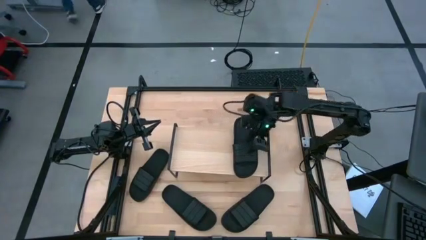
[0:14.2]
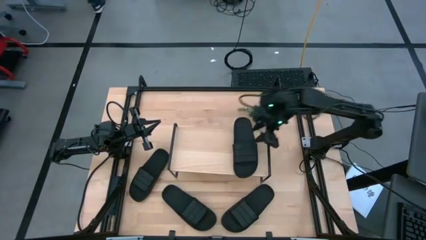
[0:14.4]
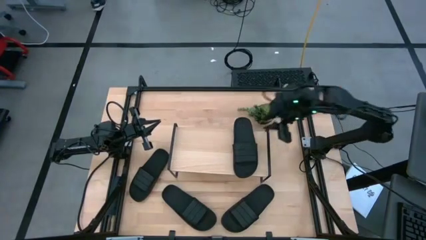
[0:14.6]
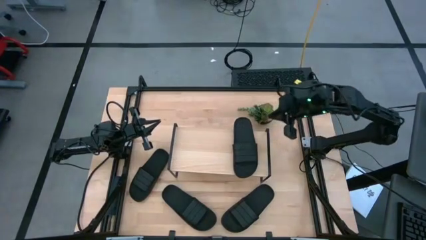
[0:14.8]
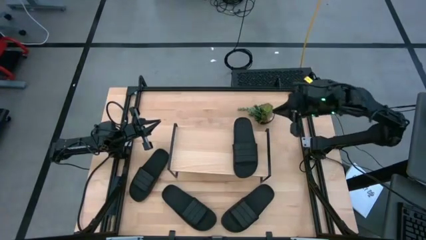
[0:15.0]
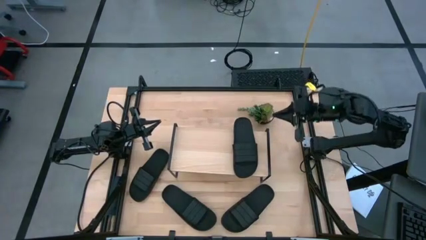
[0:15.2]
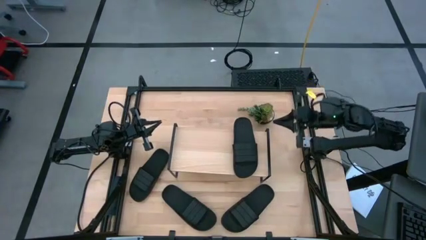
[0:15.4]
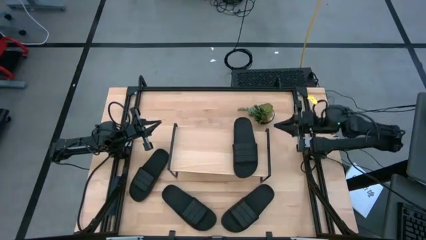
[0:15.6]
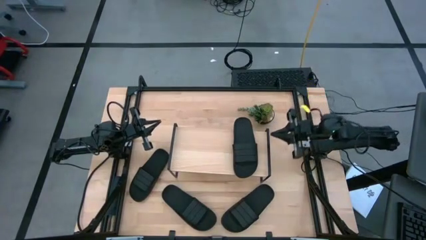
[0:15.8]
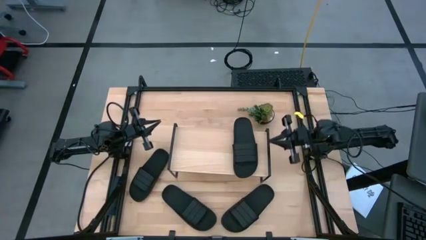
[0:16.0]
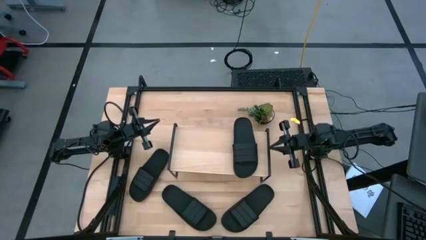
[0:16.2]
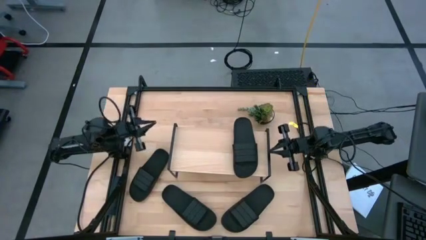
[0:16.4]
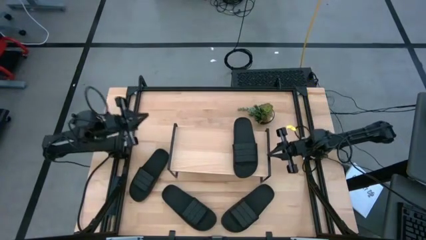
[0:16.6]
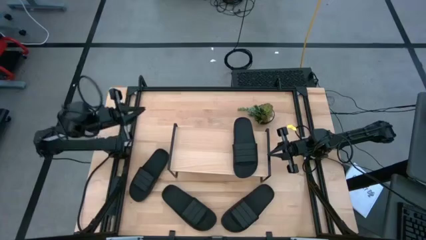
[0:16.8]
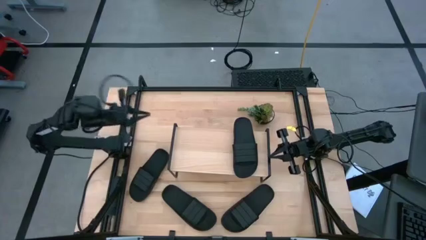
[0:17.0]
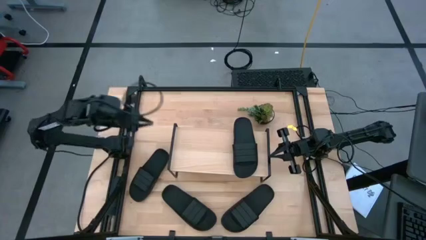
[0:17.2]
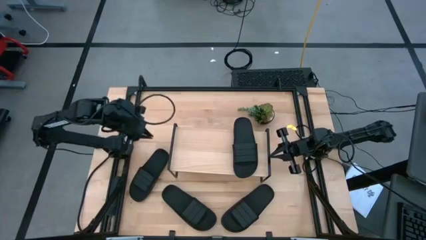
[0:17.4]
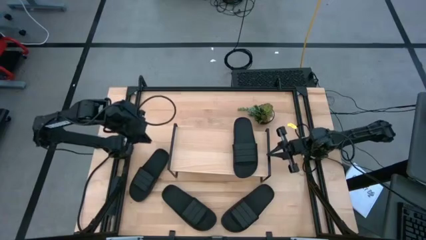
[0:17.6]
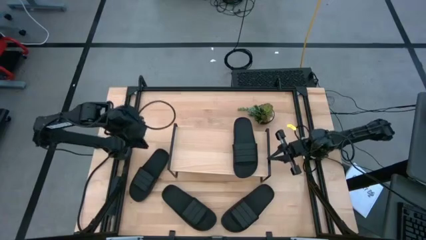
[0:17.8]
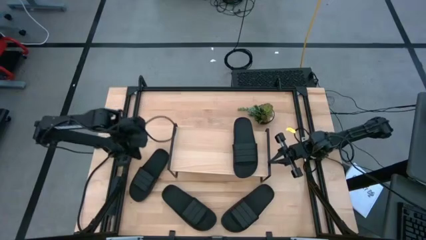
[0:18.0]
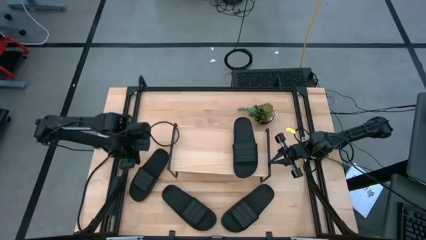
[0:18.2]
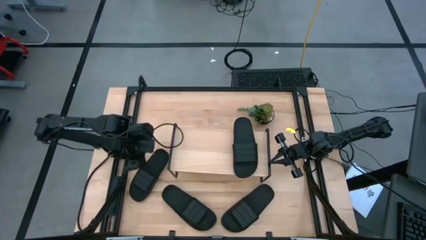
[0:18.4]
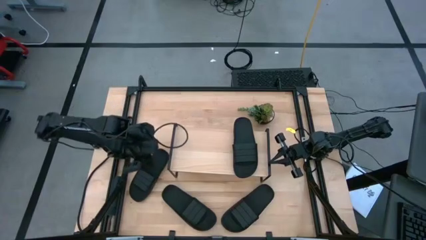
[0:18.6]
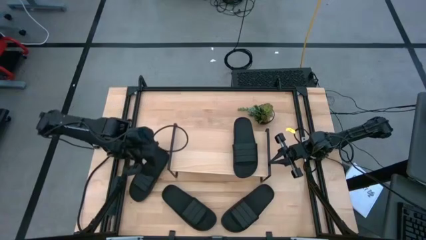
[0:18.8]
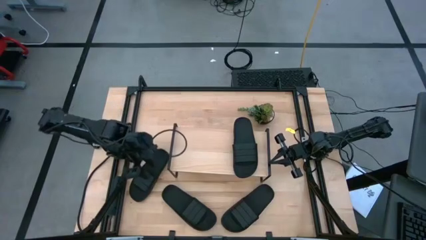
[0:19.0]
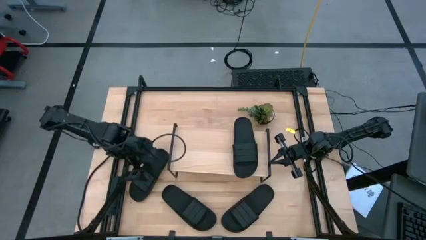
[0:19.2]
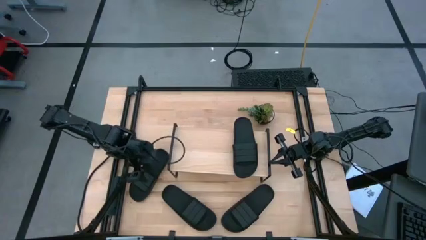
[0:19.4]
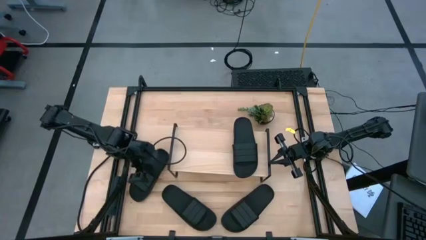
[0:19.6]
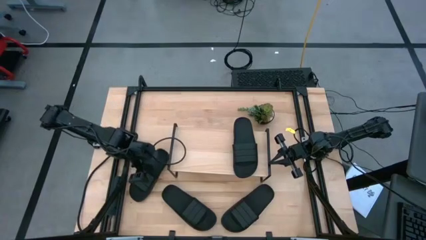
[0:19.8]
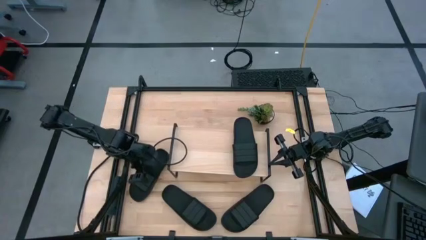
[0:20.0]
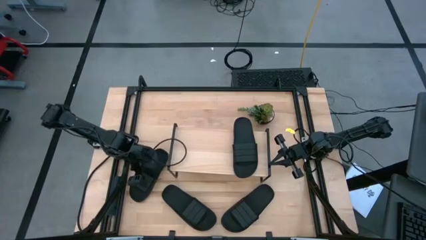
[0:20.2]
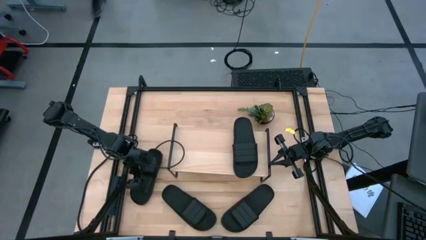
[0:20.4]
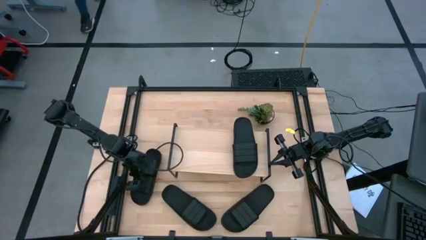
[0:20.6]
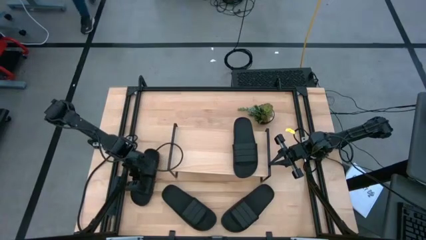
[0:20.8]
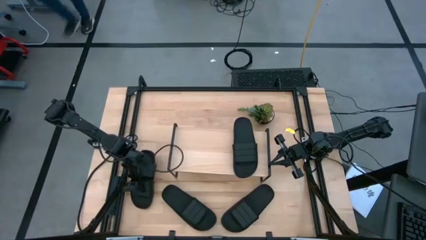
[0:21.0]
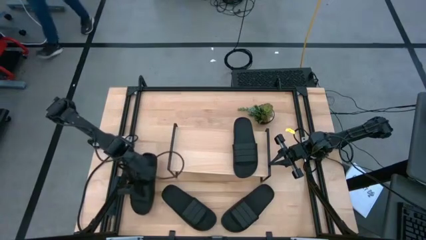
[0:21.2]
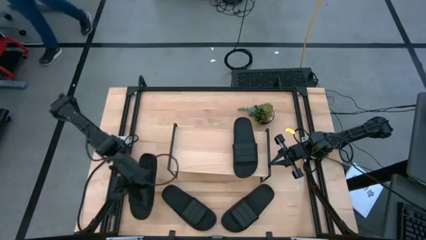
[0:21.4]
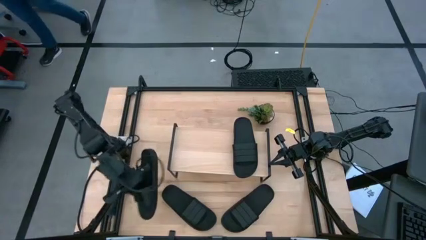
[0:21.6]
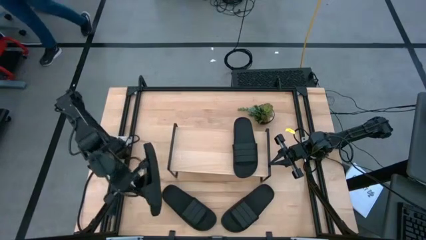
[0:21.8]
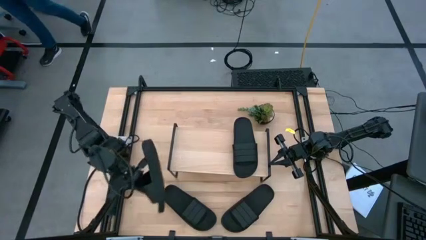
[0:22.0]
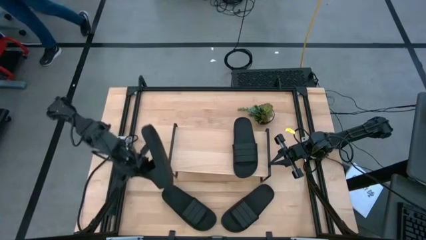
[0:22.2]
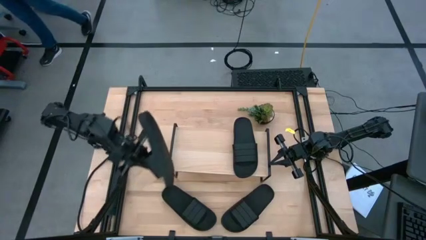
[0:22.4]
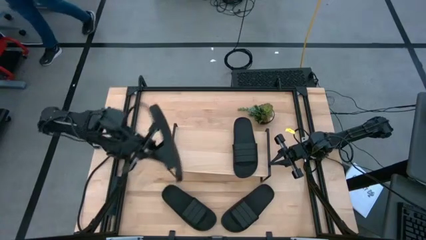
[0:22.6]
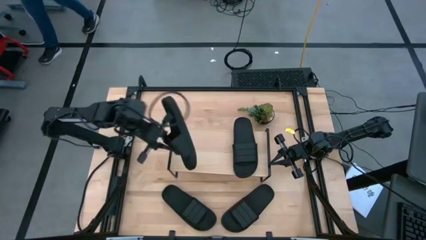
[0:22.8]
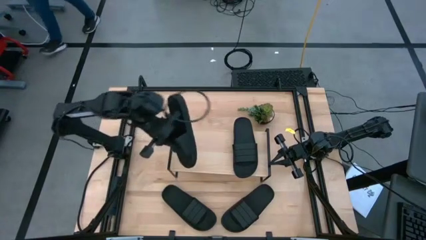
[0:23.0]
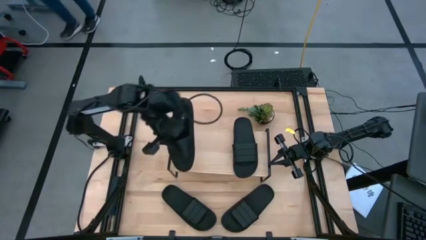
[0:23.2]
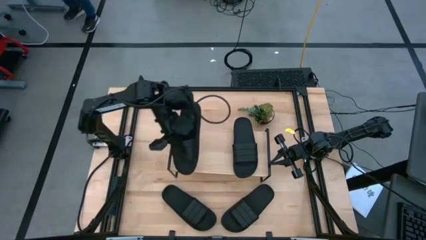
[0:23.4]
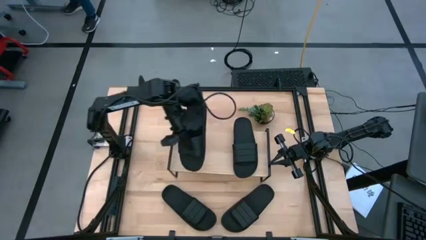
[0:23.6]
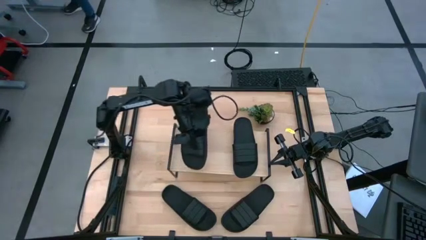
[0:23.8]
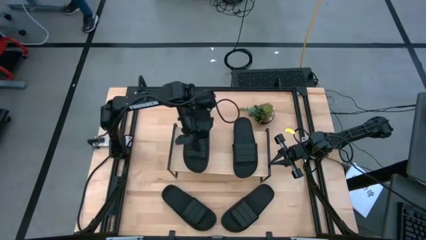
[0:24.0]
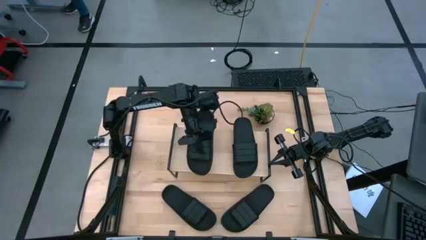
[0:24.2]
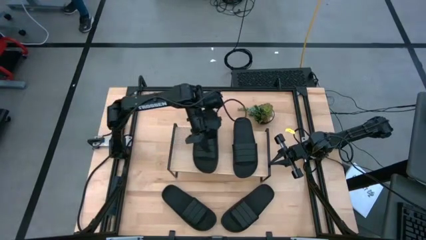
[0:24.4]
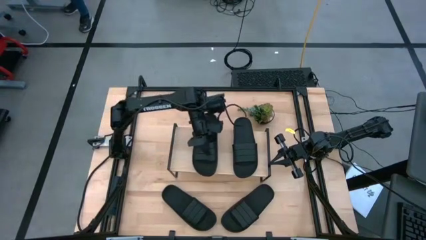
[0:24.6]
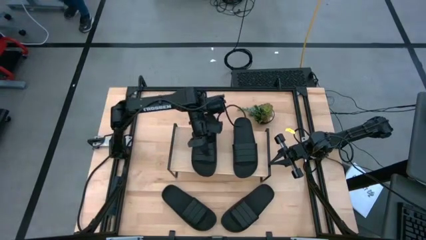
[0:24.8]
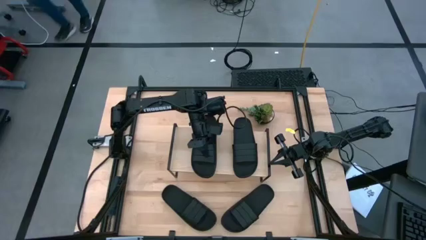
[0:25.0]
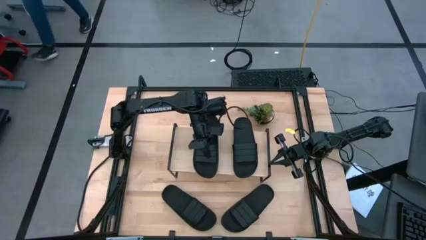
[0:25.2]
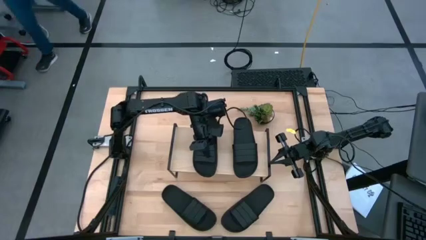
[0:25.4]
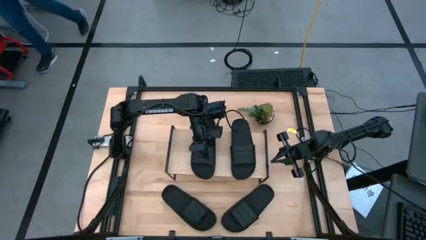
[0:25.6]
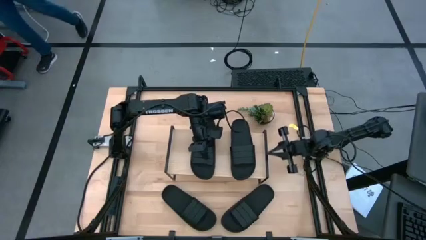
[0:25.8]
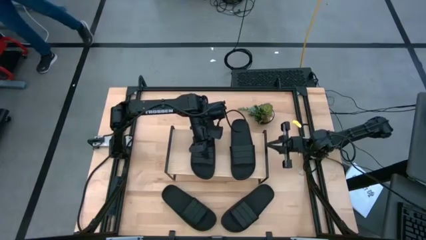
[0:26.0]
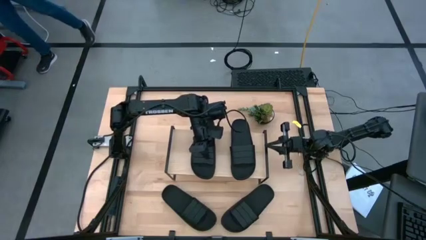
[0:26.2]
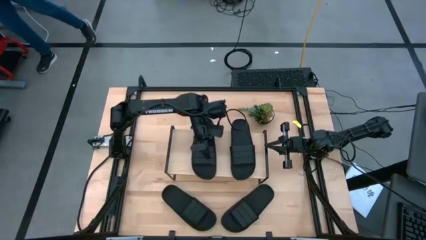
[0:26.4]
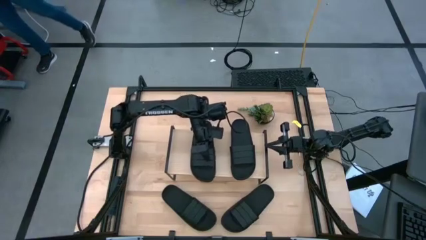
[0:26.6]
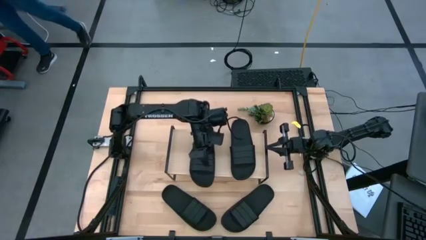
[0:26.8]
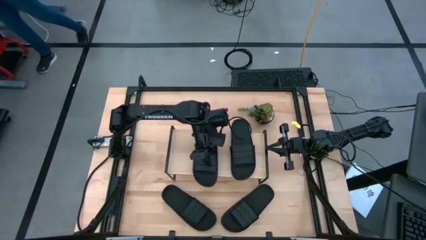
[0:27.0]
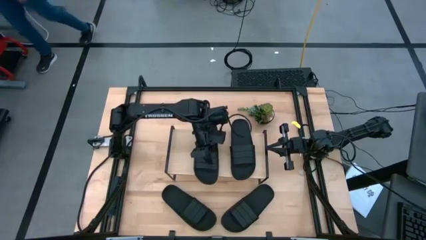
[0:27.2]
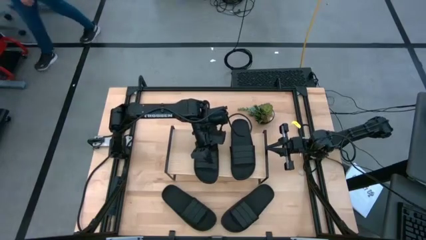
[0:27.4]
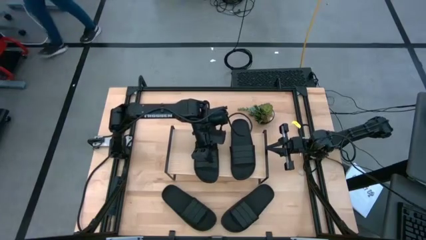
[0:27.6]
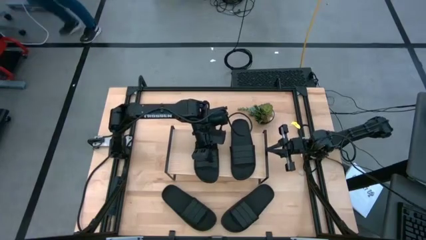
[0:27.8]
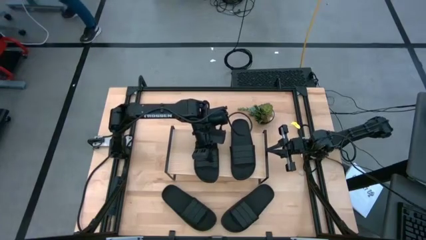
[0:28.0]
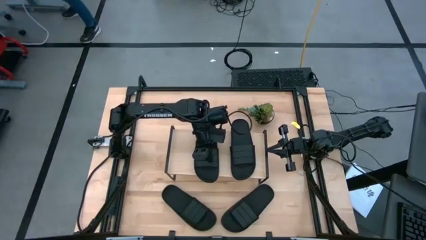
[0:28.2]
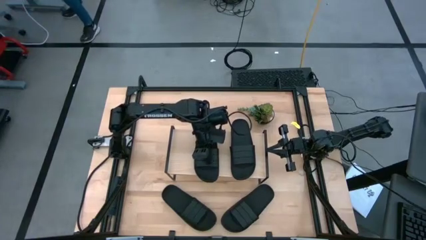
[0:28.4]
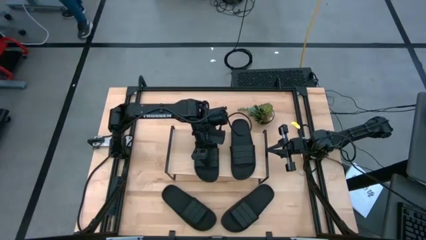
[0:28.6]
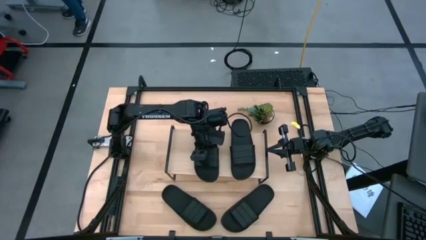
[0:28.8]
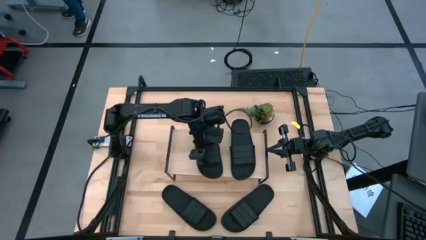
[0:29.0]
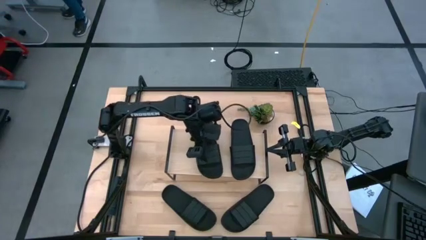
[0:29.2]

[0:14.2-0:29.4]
Task: Pick and place slides into the shelf
Put the slide on the shelf
